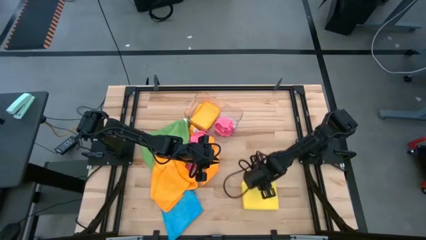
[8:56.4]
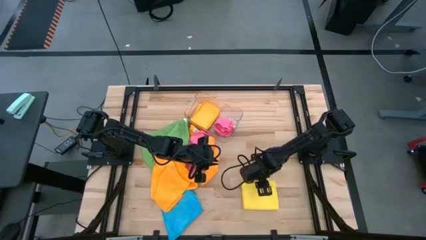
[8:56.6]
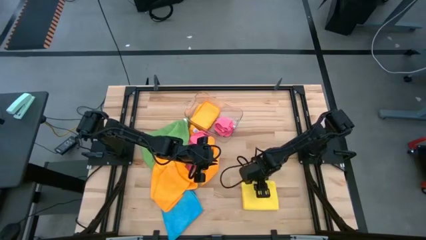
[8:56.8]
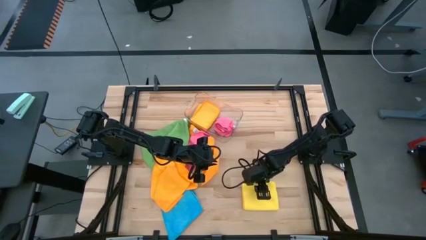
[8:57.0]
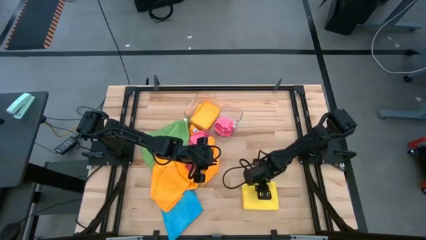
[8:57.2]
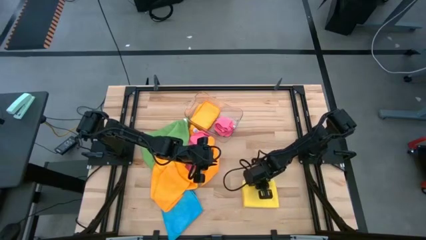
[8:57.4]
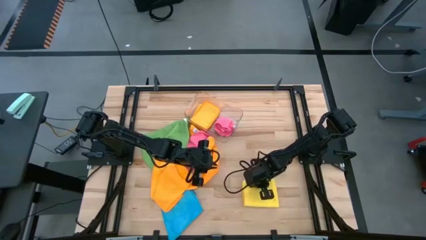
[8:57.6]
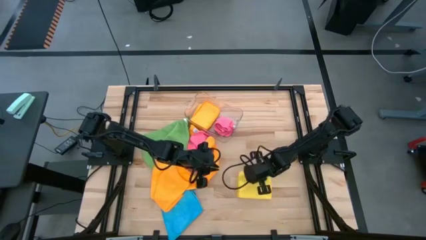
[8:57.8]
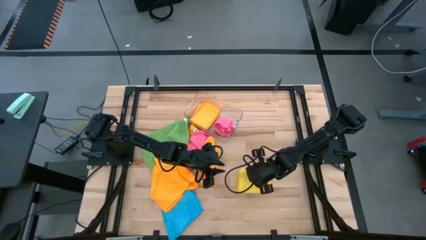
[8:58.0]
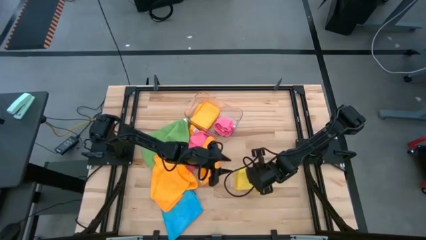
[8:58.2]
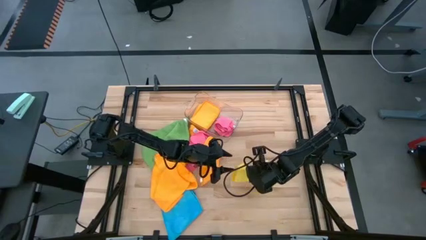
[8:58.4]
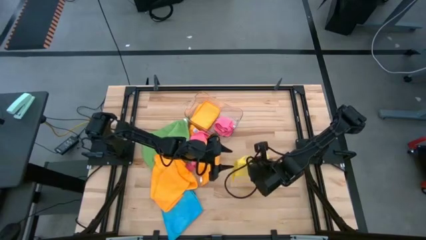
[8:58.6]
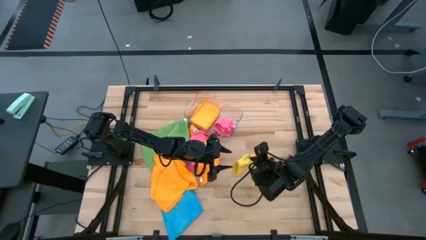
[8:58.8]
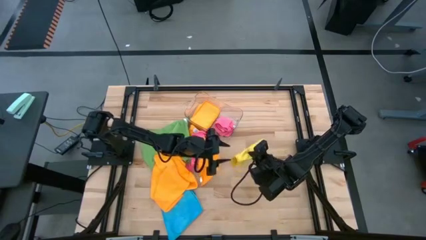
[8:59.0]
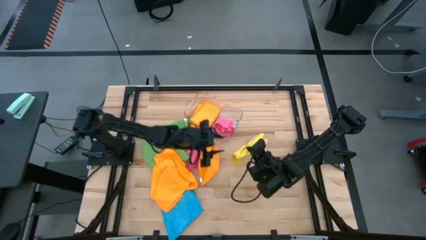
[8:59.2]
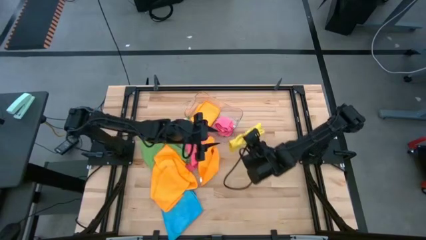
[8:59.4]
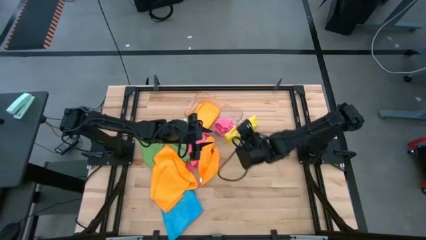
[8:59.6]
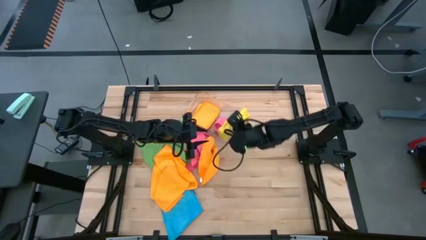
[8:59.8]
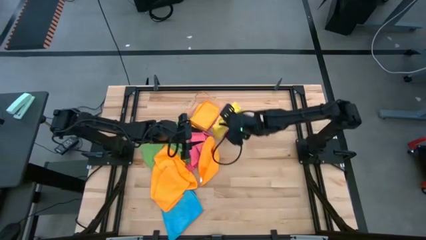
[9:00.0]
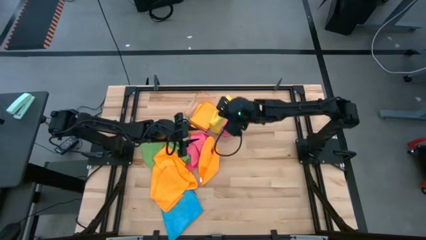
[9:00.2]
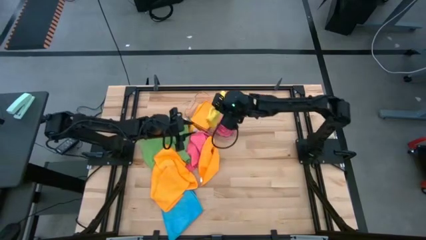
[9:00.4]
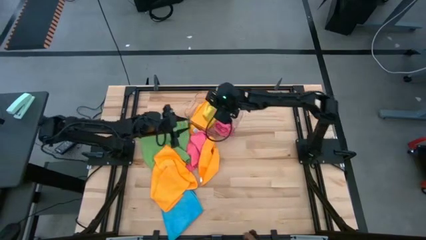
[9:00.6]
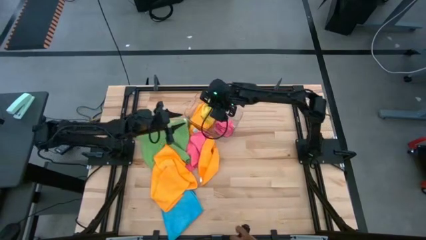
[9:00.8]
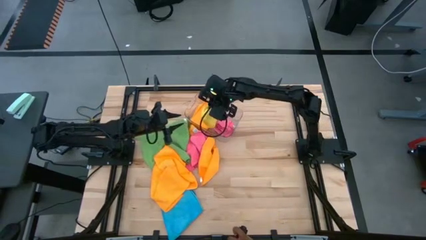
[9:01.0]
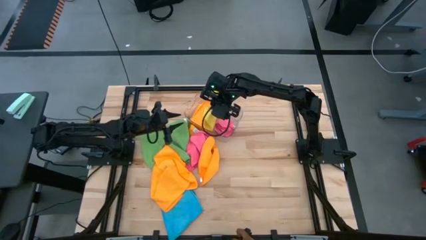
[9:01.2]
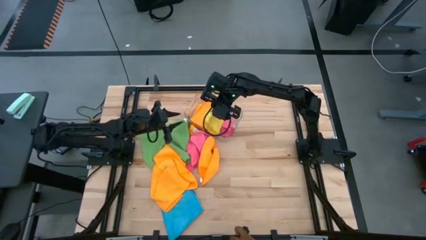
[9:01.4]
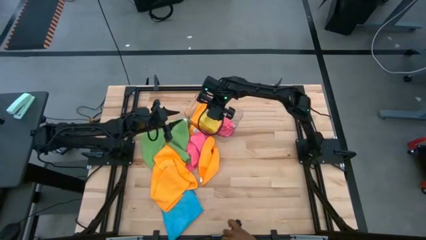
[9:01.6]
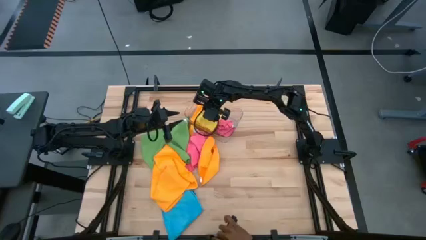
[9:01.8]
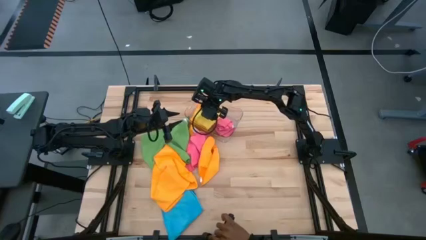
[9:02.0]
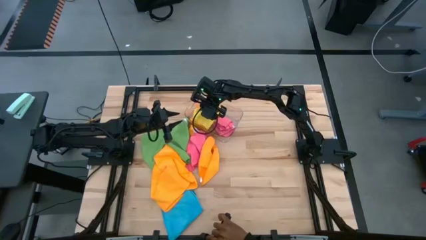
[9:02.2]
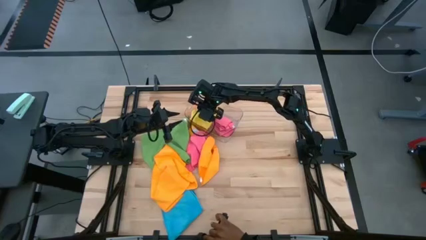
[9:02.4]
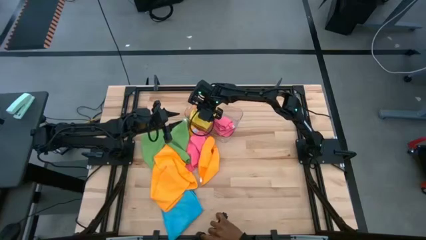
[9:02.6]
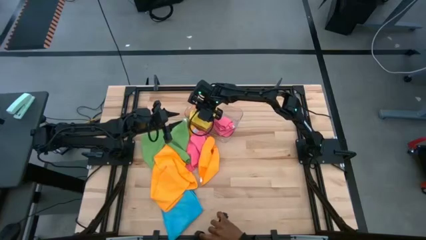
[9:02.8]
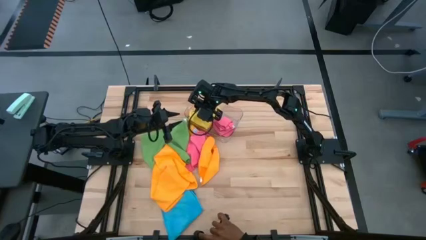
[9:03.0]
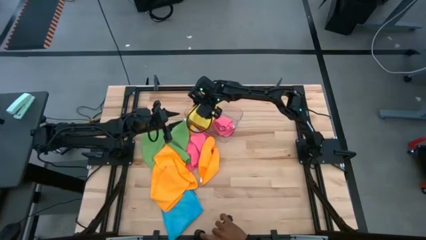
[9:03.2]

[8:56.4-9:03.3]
Task: Fold microfiber towels
Put the yellow microfiber cloth into the transparent bin

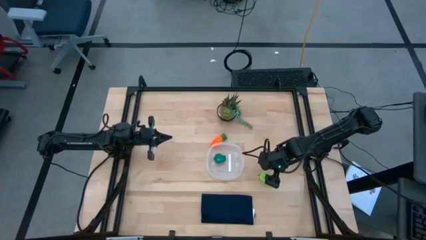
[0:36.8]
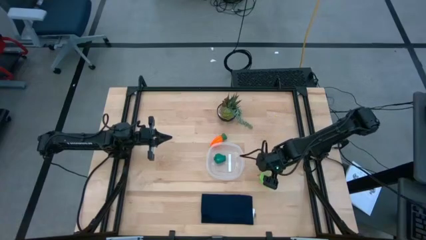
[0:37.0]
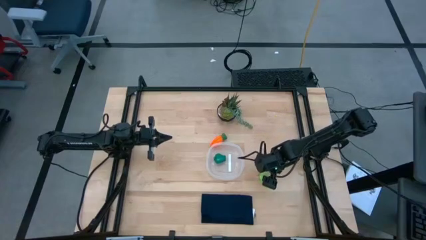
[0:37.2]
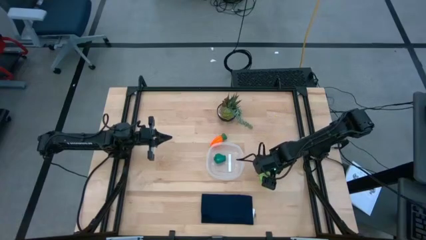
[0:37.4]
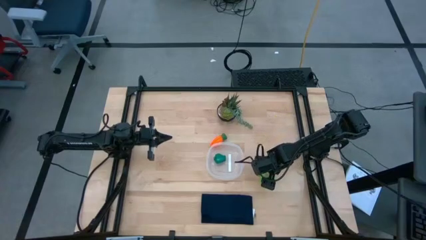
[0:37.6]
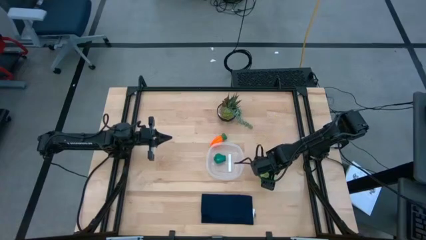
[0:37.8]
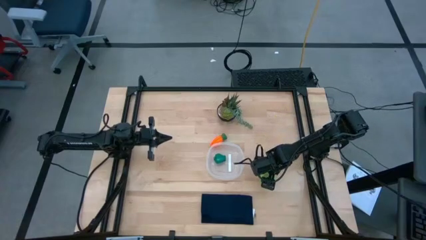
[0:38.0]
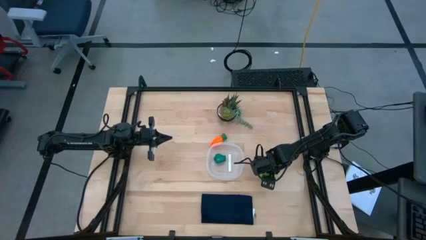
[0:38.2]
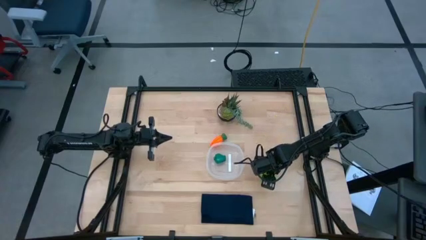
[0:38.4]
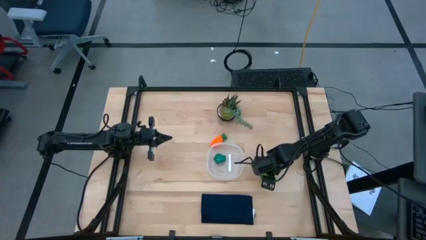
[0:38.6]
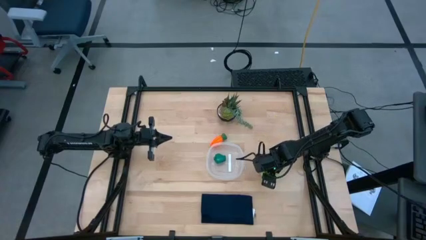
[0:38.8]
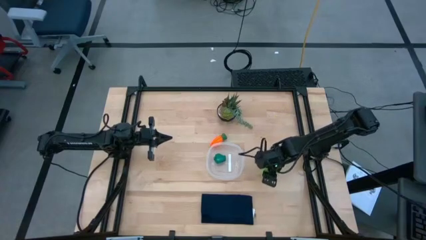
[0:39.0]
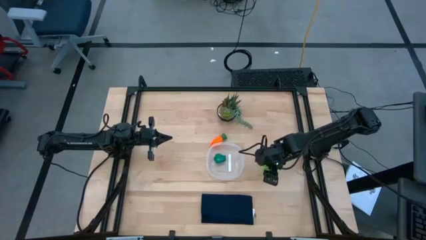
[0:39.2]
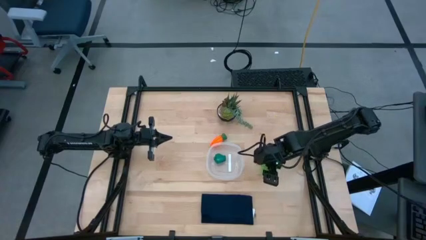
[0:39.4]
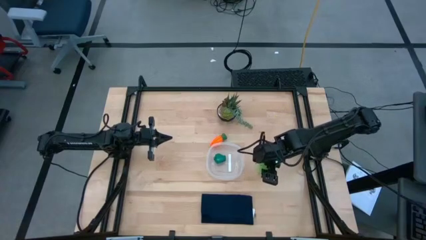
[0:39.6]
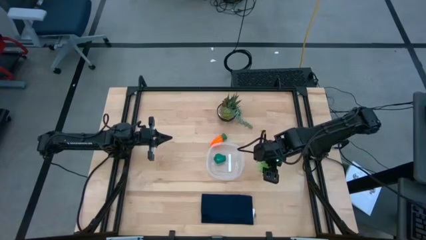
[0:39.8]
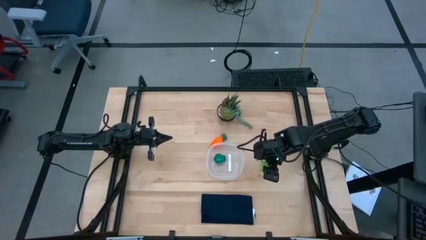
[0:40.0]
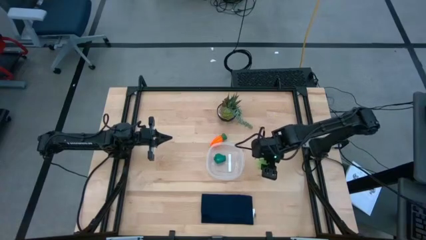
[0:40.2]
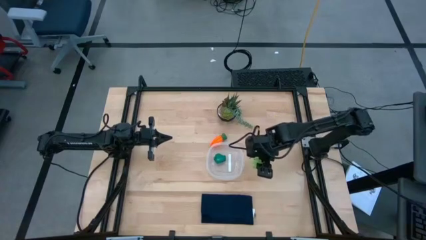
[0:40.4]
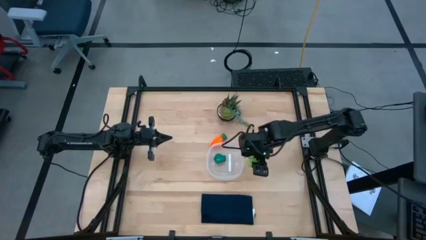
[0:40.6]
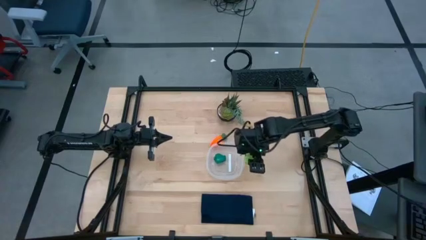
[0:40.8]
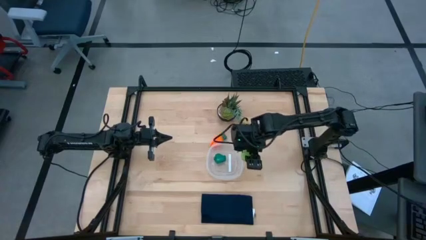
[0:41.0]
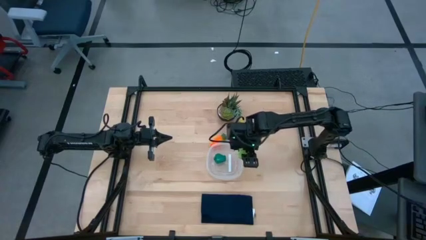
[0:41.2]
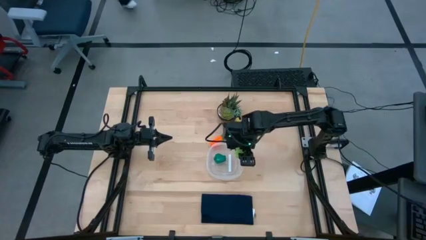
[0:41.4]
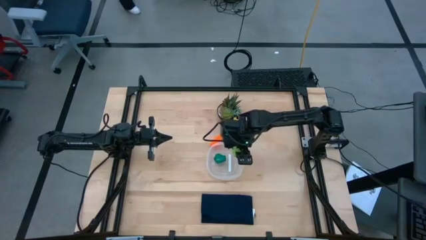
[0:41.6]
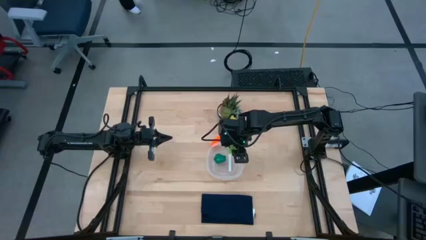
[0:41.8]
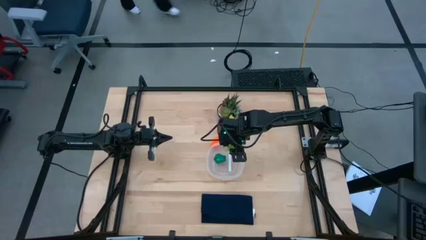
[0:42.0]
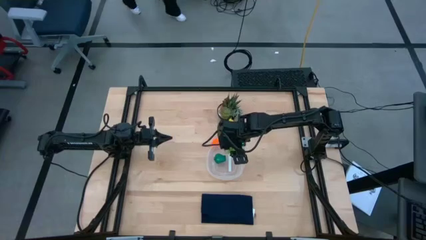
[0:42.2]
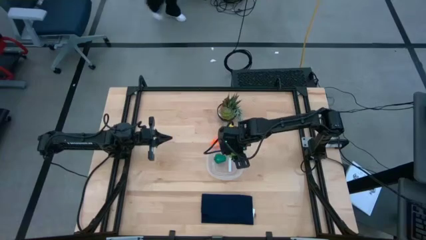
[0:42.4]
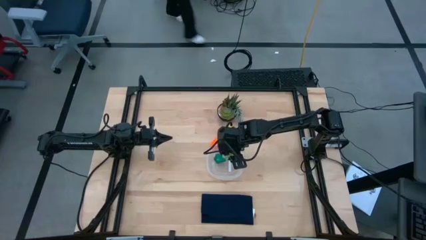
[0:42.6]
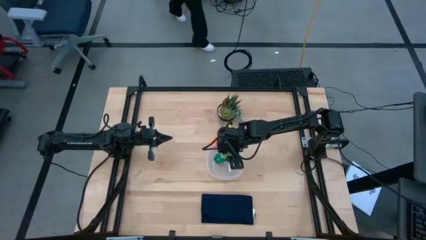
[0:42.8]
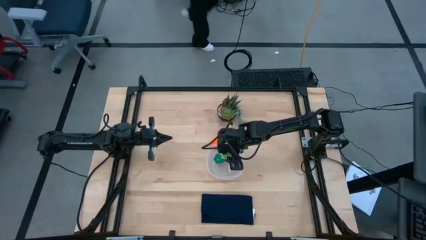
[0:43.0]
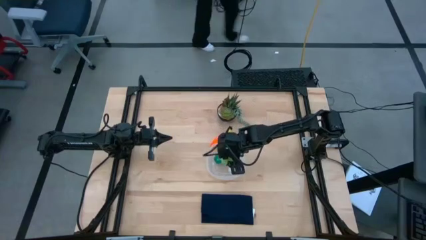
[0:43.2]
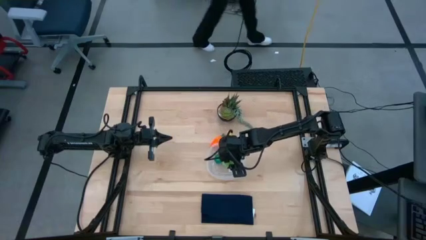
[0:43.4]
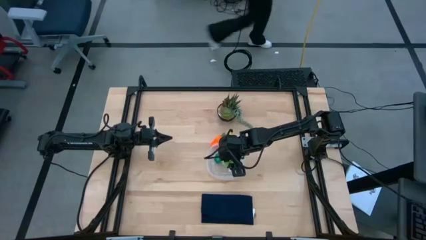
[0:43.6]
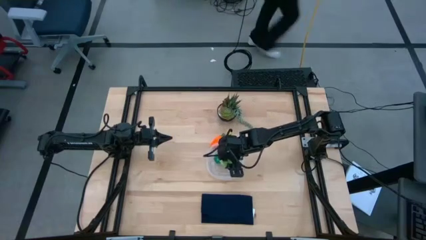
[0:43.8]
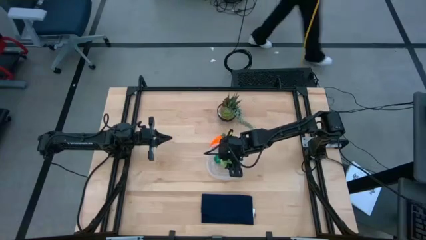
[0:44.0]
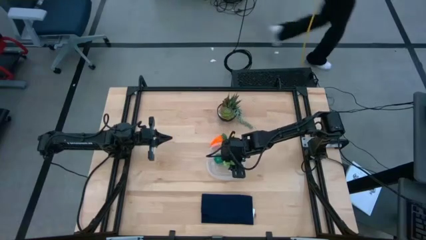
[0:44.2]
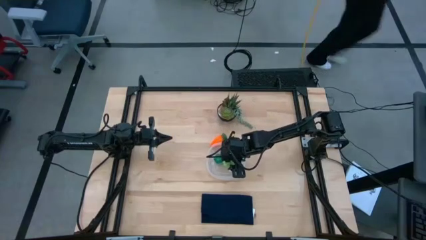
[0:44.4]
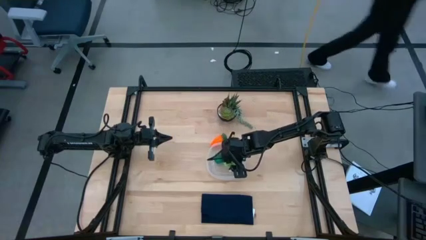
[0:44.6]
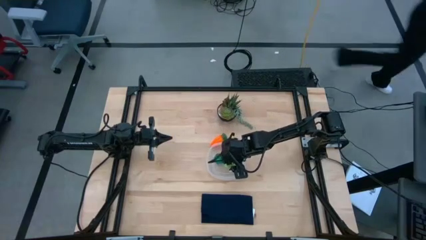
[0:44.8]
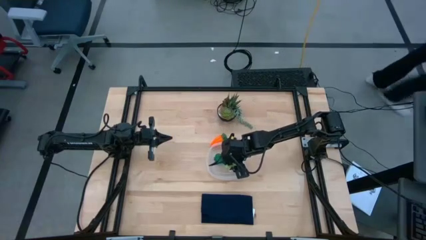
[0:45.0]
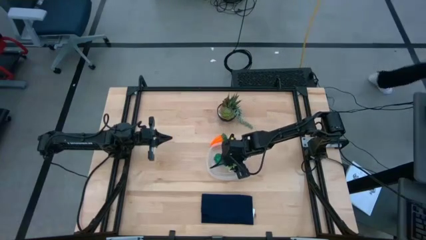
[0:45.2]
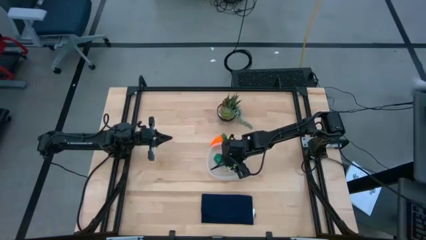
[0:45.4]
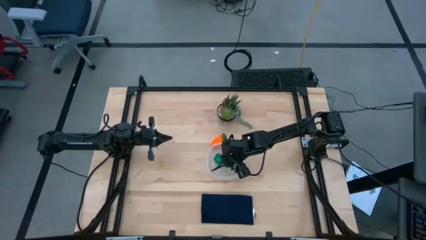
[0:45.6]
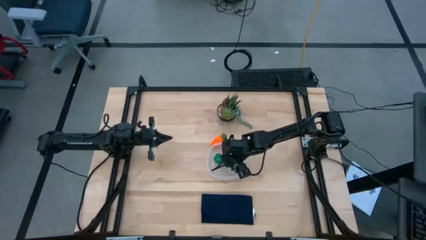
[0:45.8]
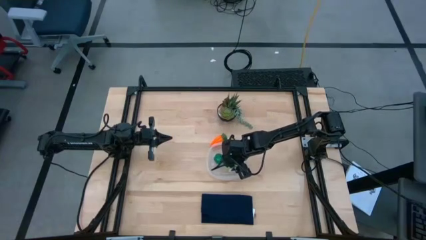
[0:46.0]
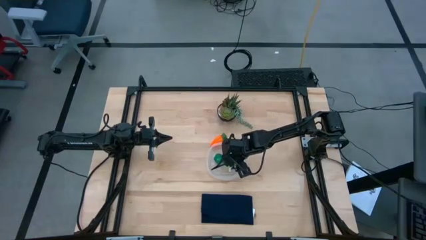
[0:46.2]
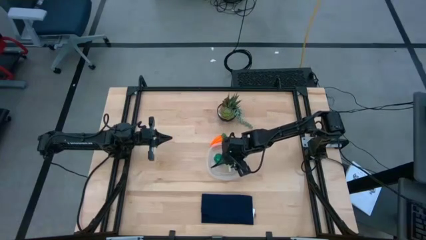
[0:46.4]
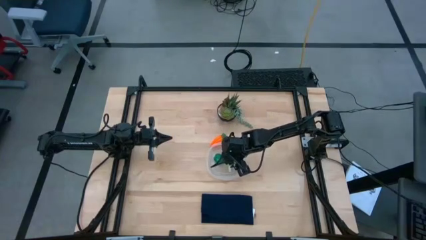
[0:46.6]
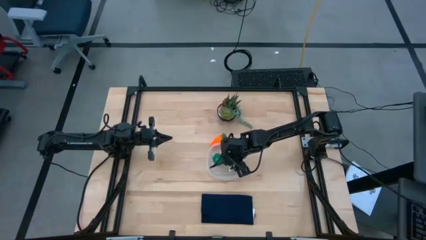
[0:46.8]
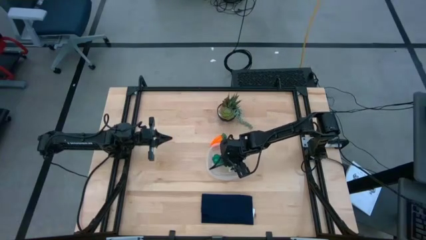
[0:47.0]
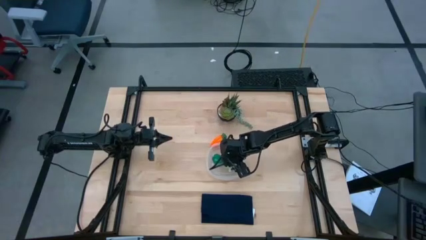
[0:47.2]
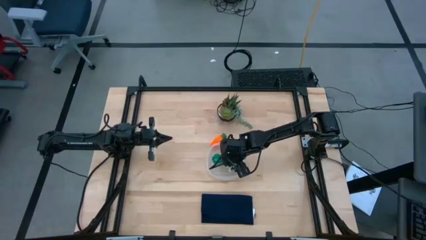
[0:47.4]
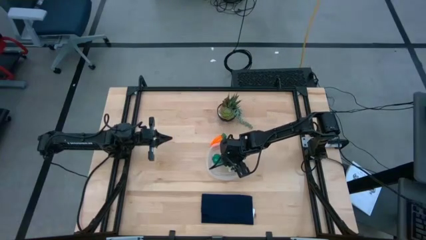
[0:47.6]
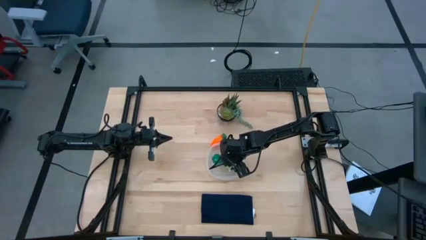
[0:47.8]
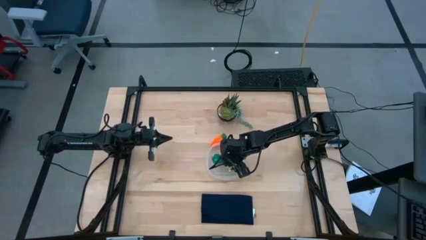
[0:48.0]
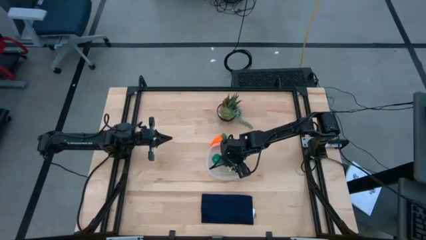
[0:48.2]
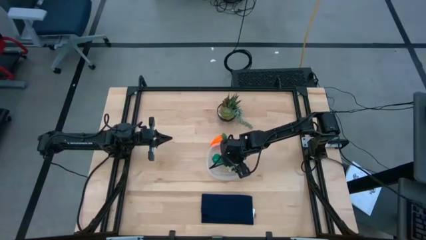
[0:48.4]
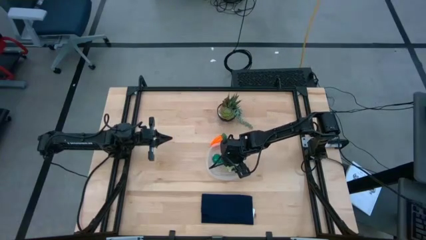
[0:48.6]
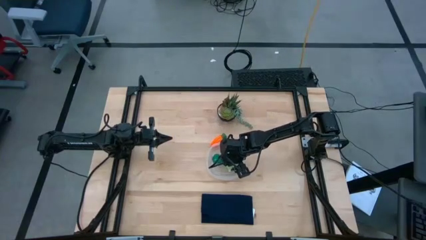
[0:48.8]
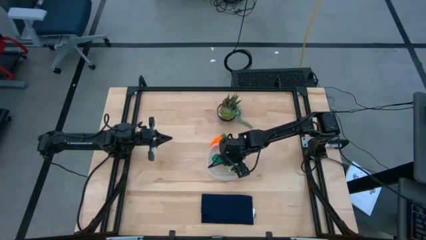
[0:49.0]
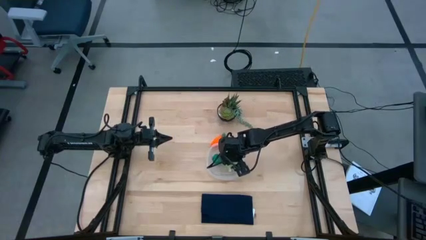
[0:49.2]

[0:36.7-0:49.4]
Task: Pick and placing Produce into tupperware
Put the star fruit into the transparent bin
